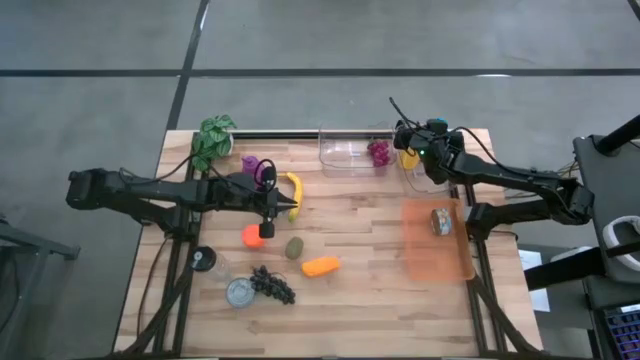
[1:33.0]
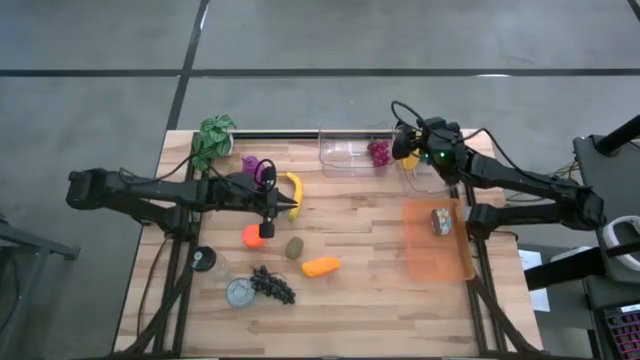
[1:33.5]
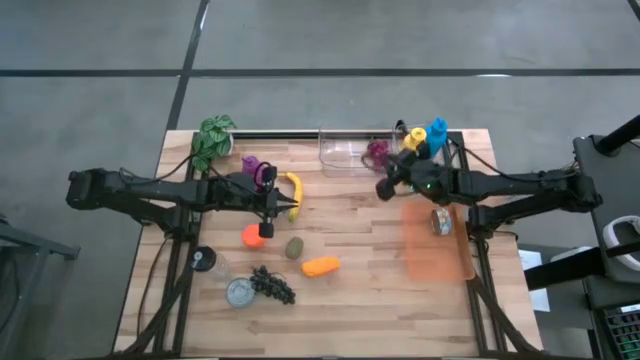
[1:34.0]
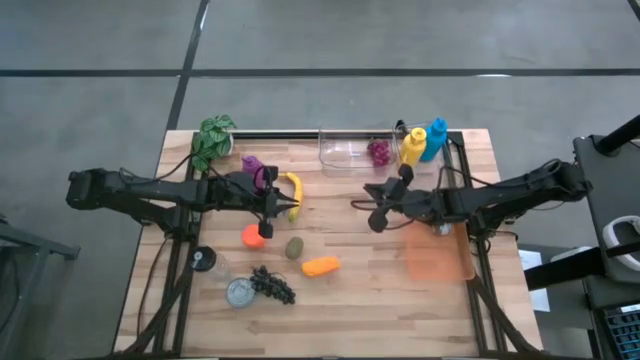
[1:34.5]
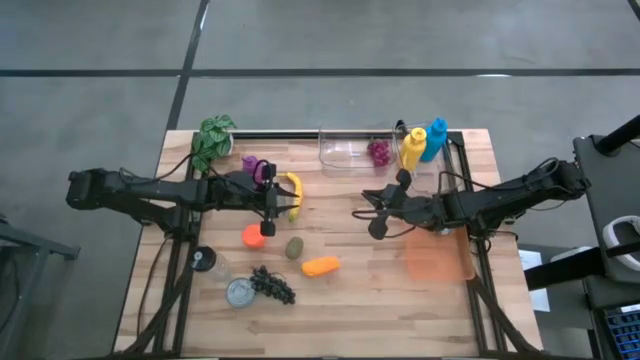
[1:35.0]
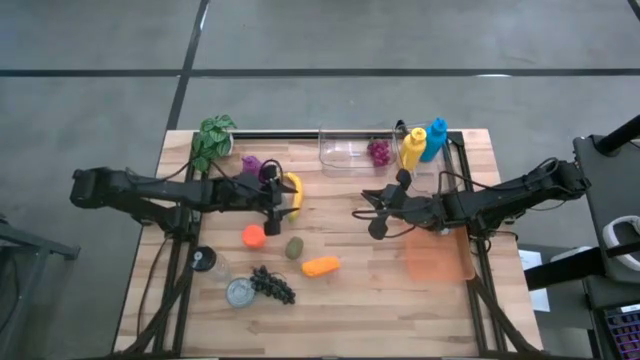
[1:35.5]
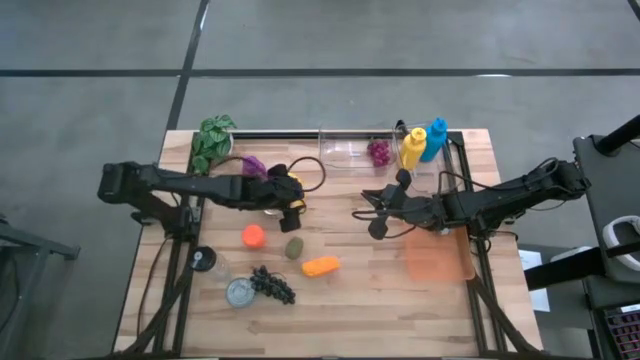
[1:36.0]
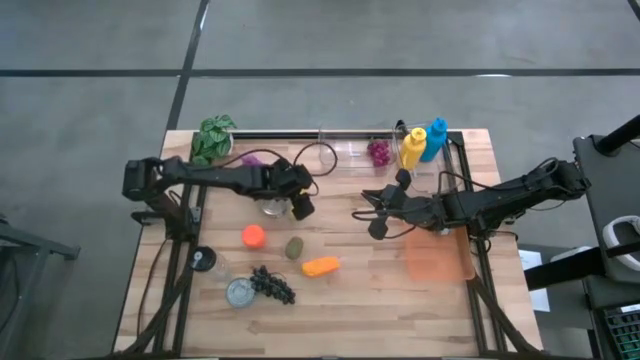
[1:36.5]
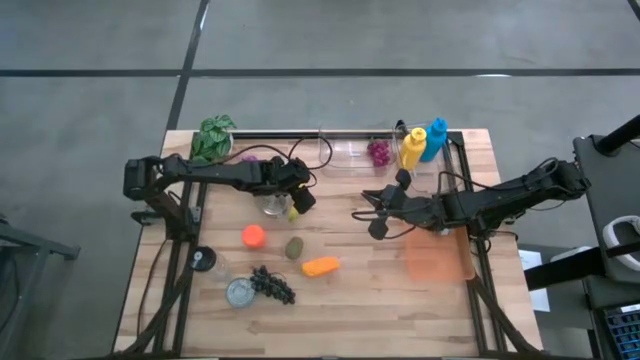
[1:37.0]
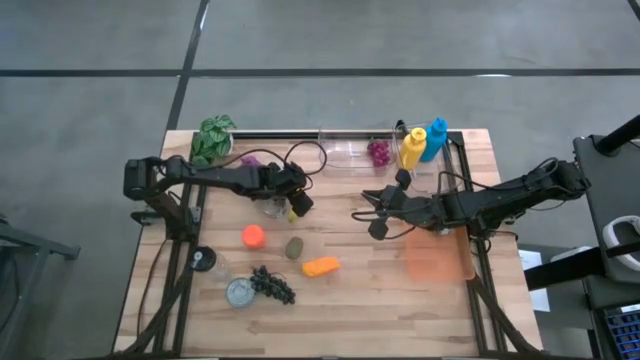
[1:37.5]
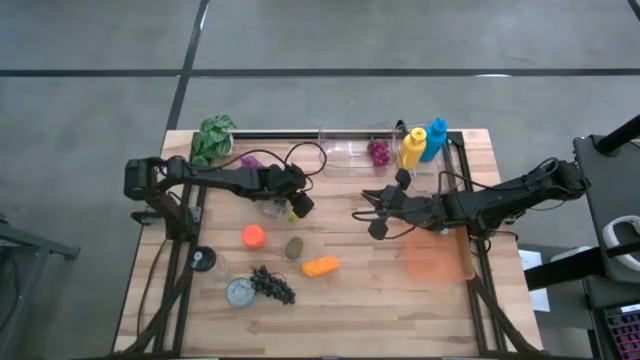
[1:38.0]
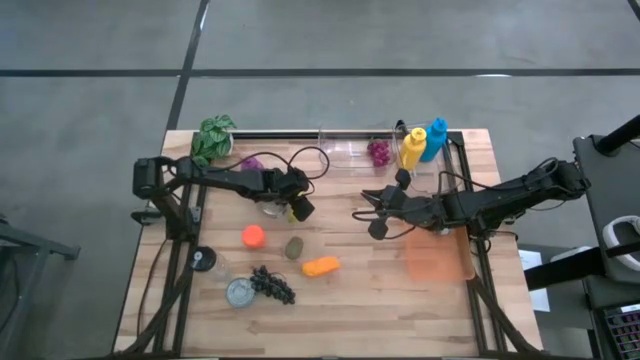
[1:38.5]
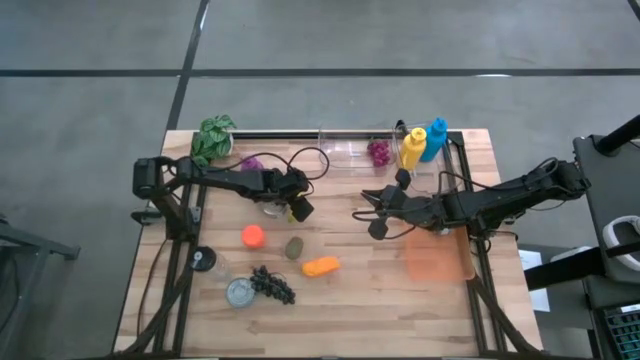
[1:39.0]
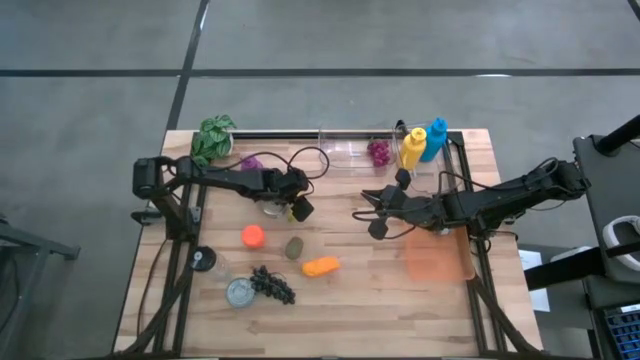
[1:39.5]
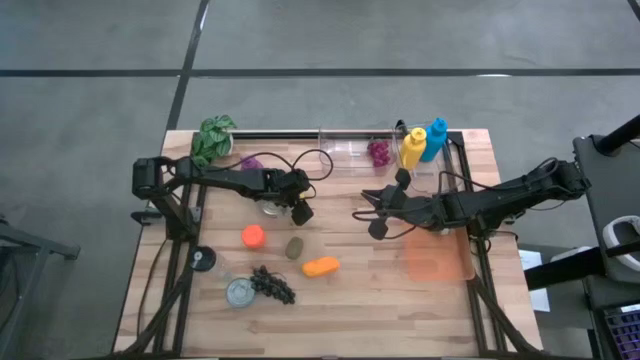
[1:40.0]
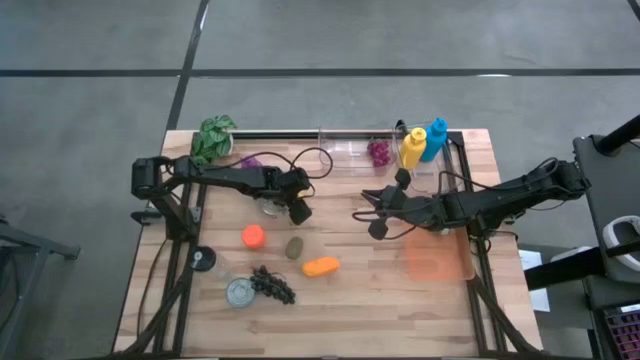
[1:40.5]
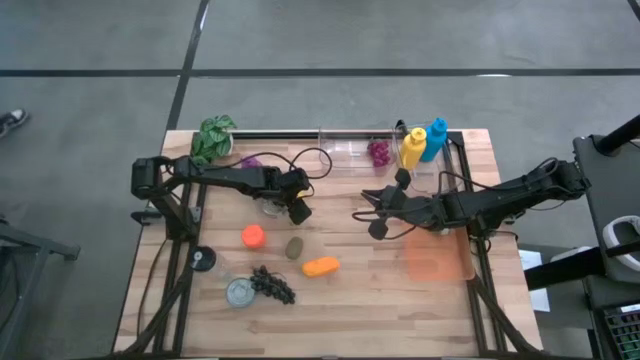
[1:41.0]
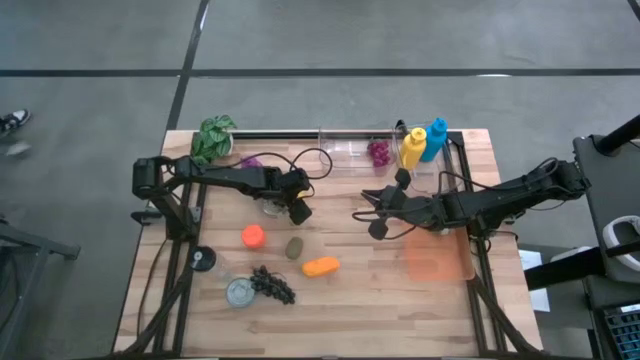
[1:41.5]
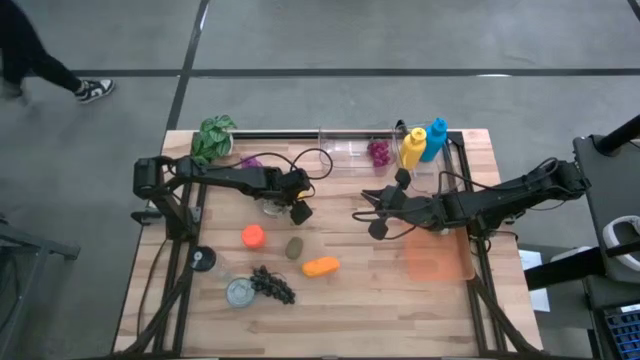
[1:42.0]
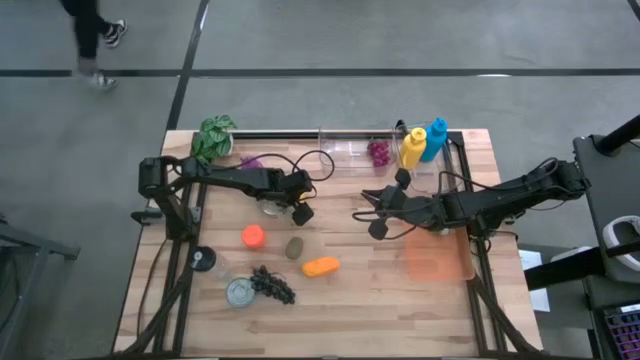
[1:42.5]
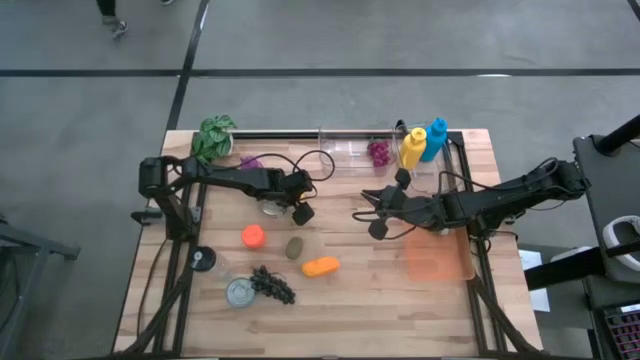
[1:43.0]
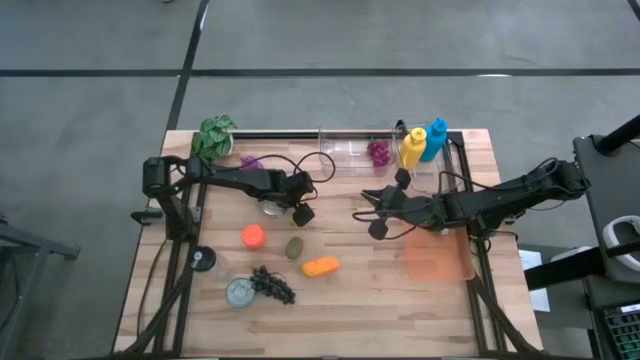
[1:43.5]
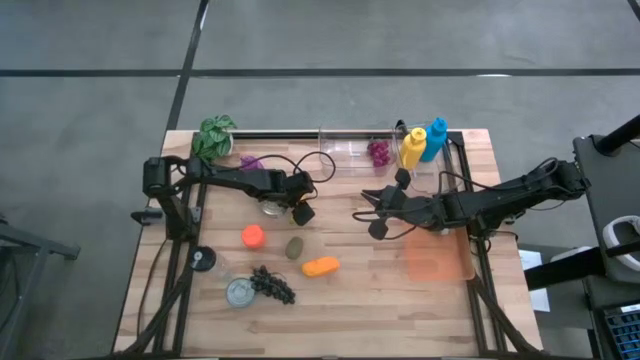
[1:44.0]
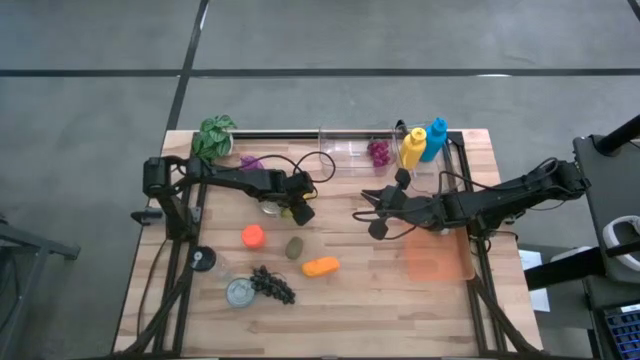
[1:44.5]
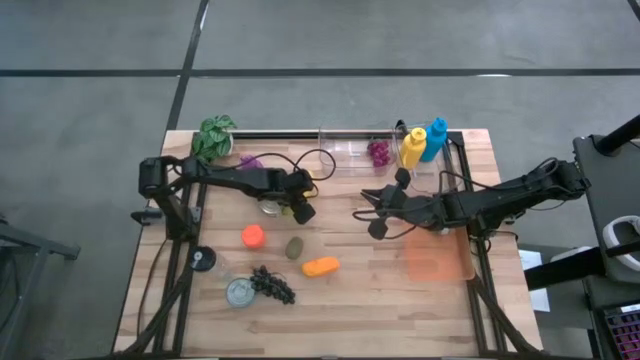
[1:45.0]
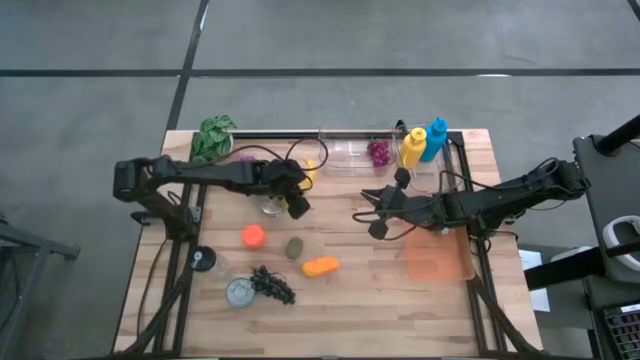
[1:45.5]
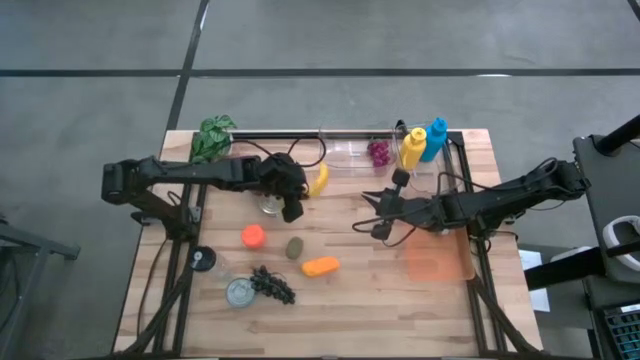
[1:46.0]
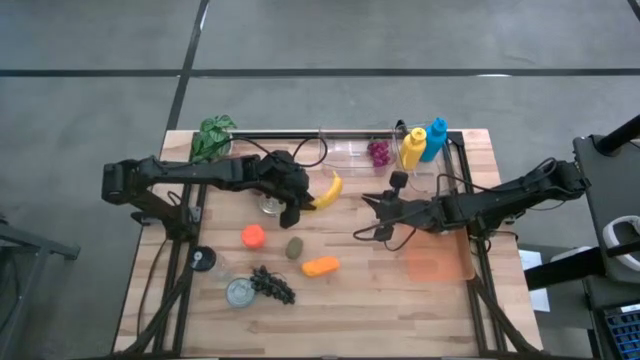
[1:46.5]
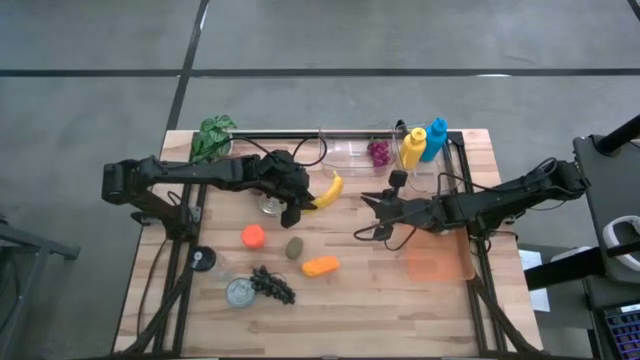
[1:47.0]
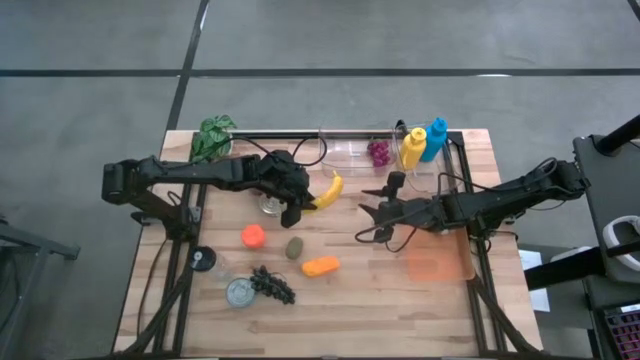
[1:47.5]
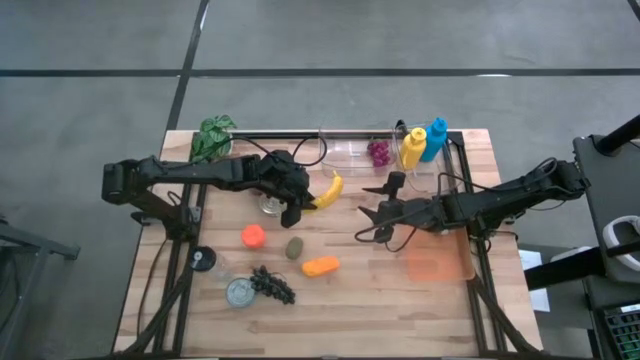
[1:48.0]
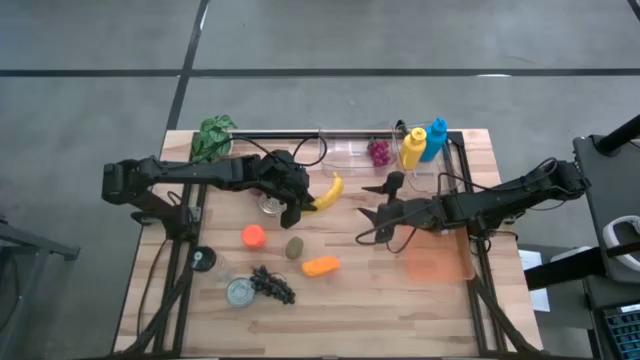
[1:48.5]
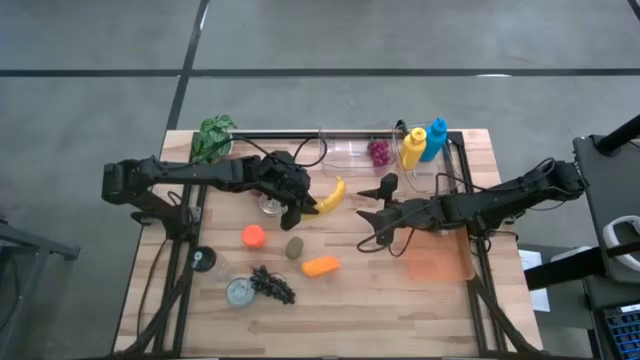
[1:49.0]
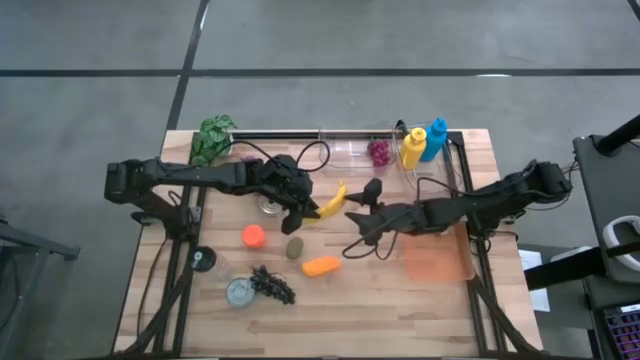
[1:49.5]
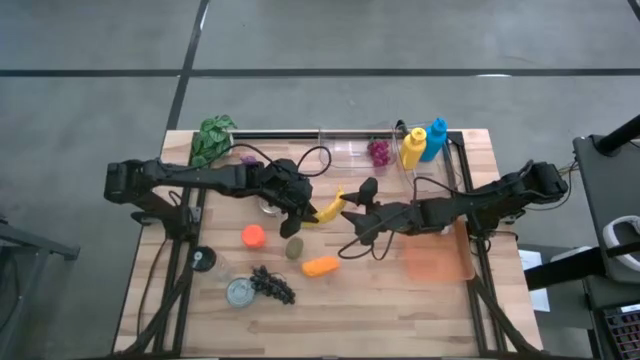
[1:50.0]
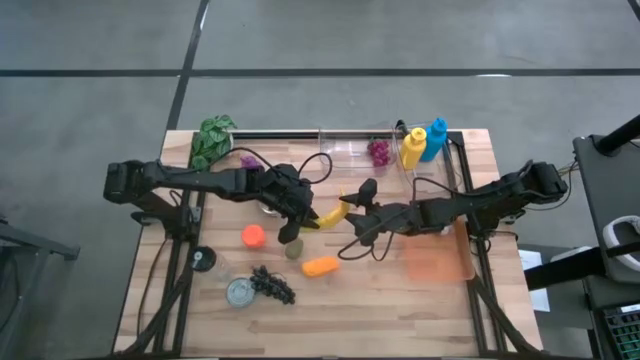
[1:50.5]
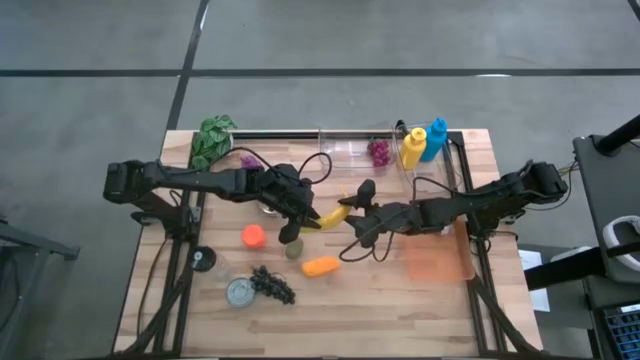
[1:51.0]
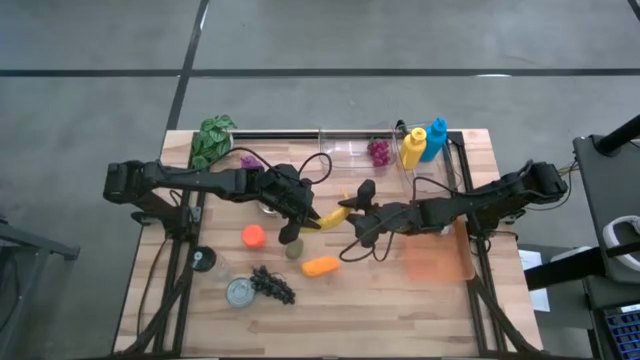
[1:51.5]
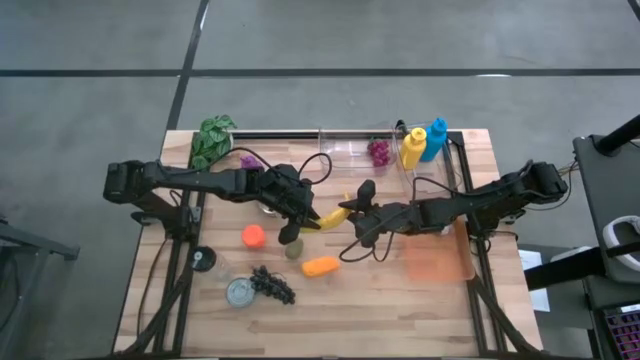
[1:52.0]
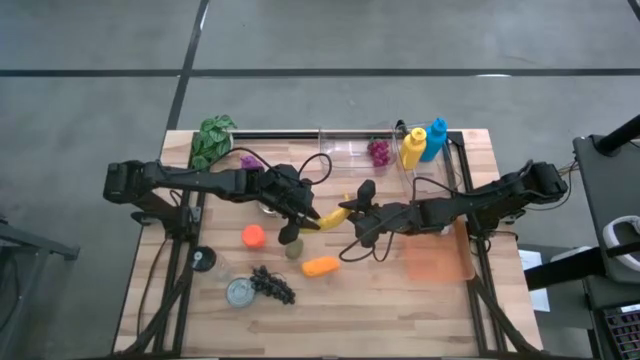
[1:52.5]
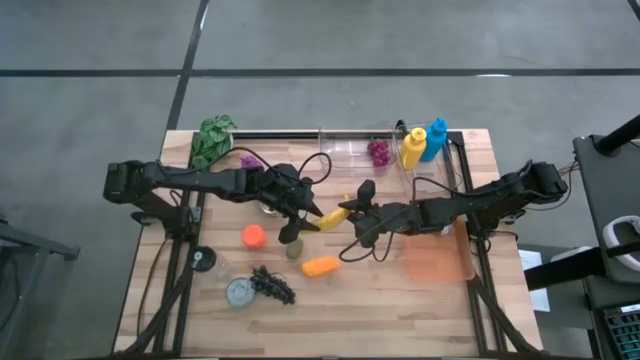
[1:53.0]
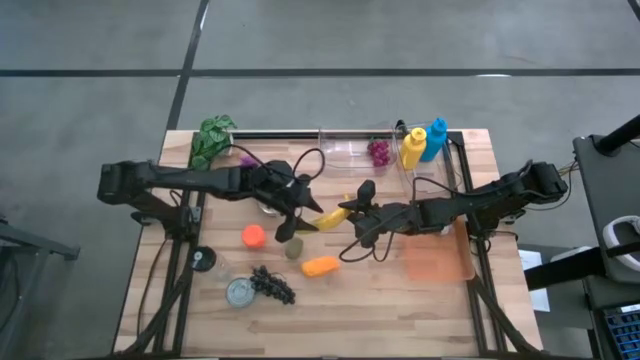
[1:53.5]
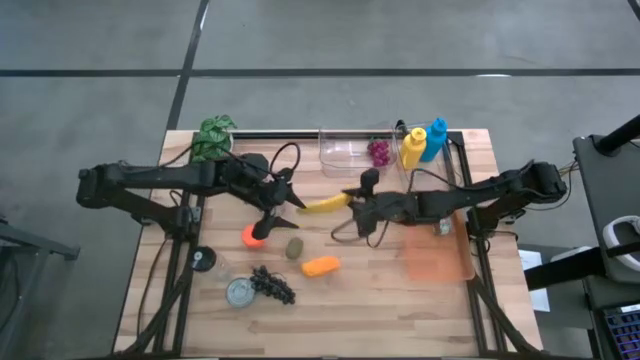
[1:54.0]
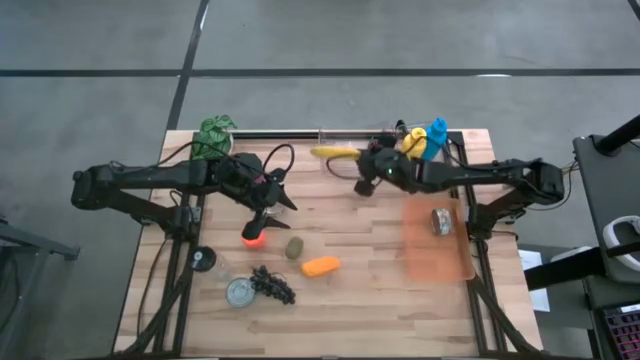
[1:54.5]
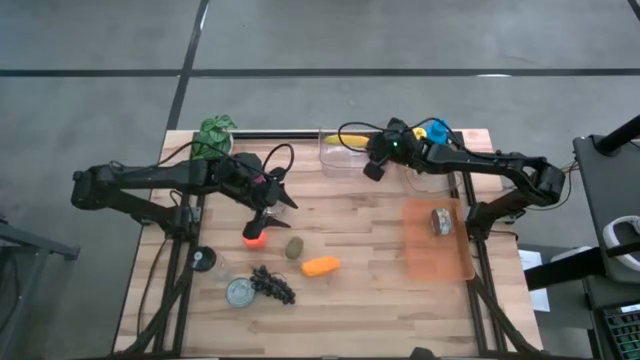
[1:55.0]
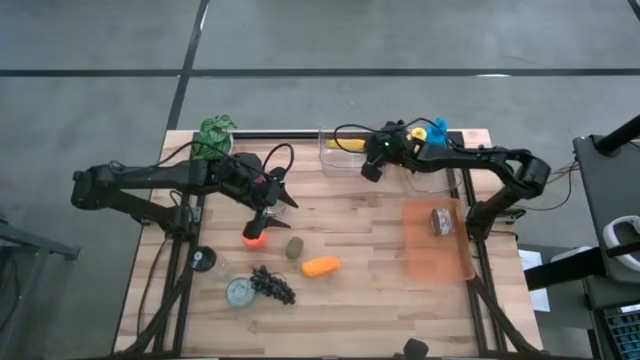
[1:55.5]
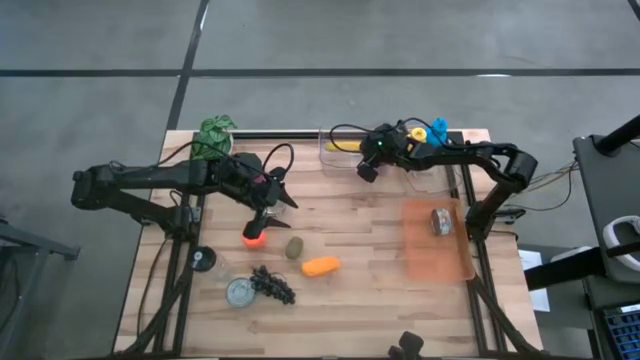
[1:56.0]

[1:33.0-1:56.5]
Task: Pick & Place Food Item
Put the yellow banana into the left transparent bin
